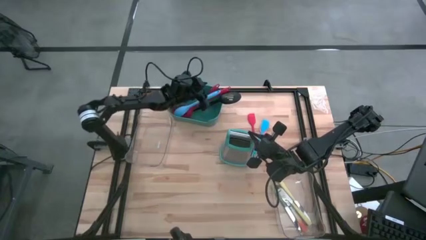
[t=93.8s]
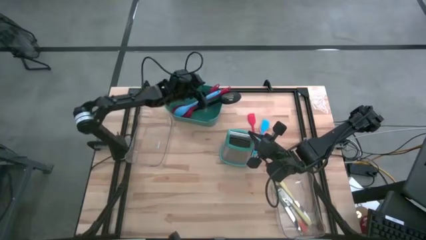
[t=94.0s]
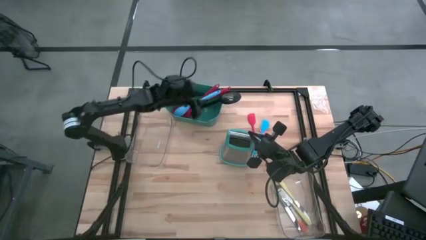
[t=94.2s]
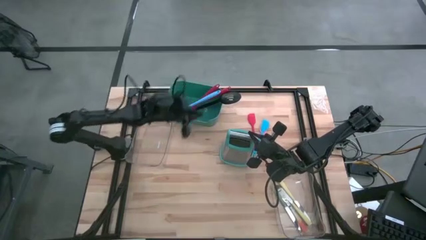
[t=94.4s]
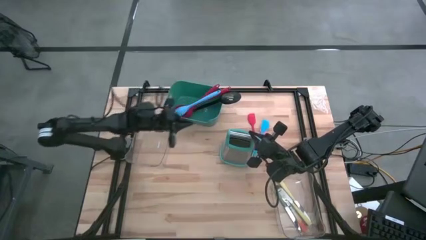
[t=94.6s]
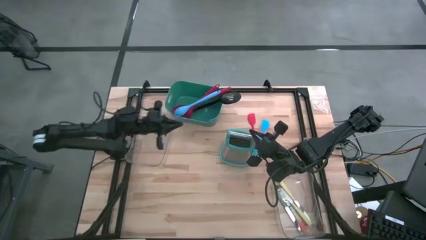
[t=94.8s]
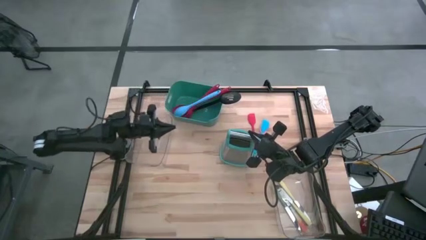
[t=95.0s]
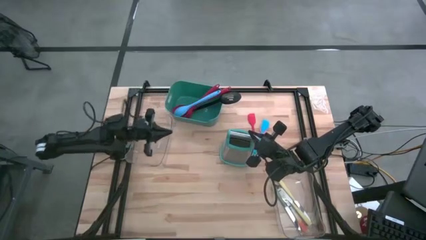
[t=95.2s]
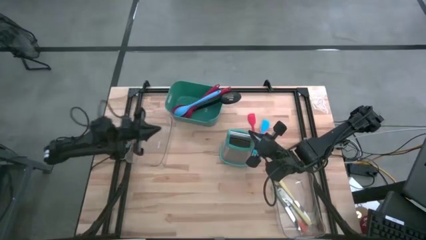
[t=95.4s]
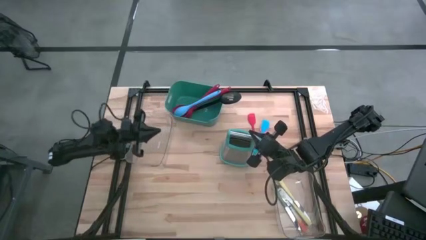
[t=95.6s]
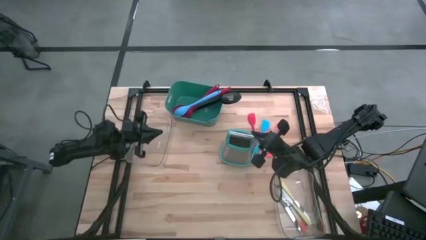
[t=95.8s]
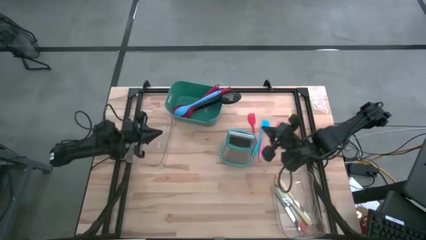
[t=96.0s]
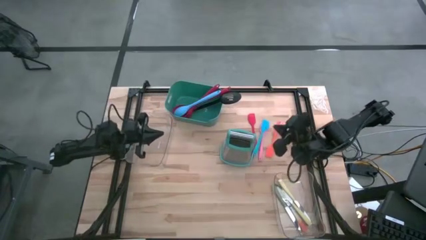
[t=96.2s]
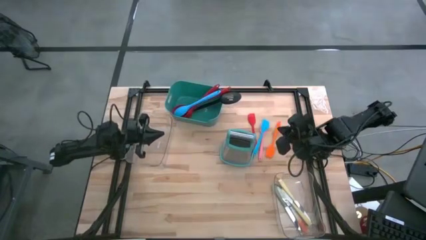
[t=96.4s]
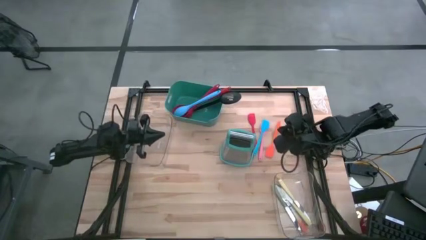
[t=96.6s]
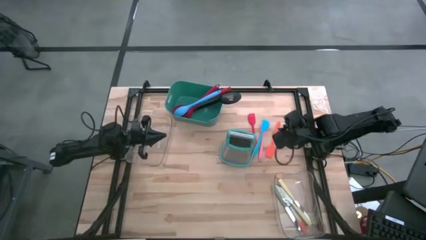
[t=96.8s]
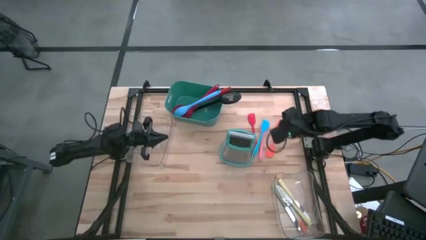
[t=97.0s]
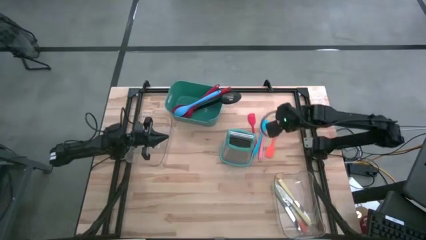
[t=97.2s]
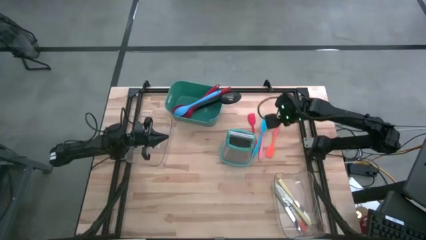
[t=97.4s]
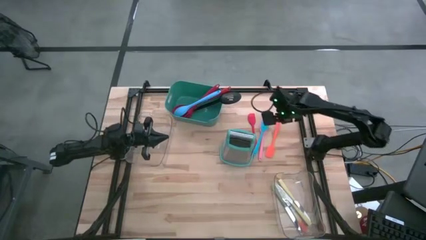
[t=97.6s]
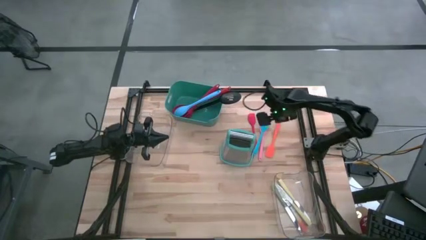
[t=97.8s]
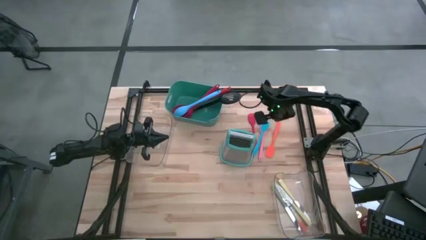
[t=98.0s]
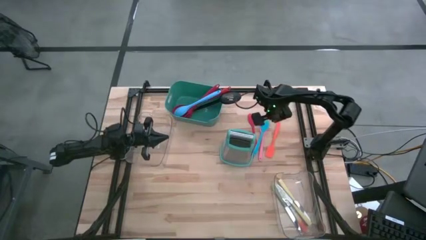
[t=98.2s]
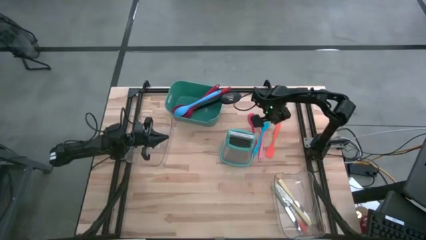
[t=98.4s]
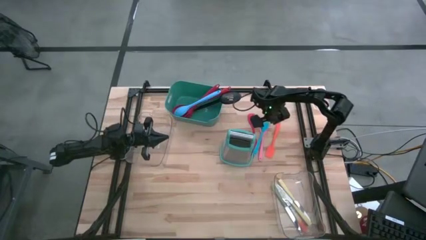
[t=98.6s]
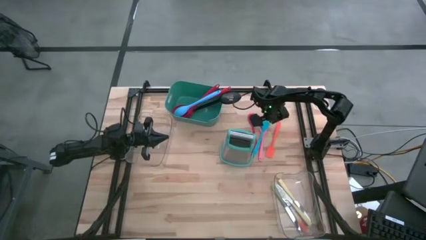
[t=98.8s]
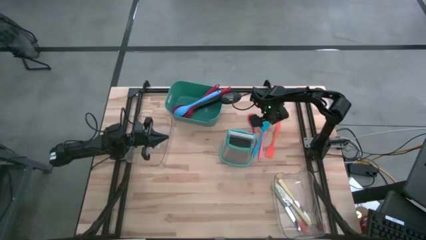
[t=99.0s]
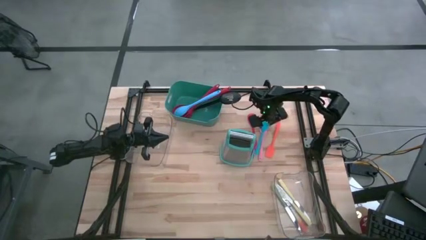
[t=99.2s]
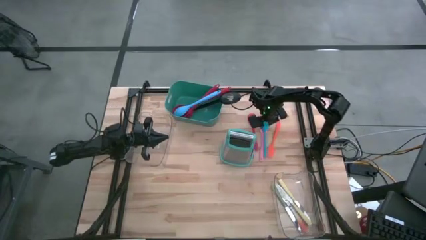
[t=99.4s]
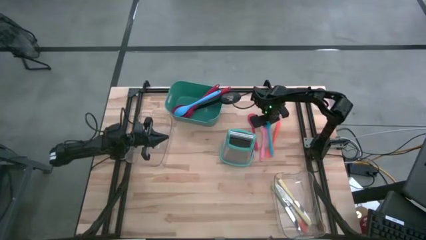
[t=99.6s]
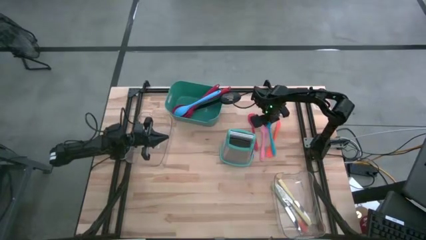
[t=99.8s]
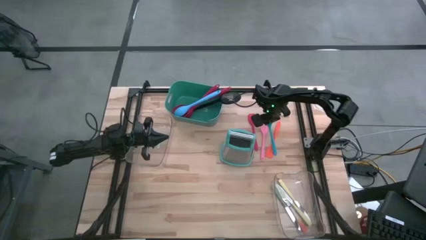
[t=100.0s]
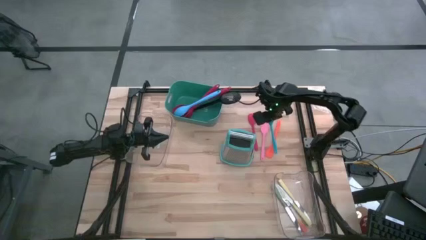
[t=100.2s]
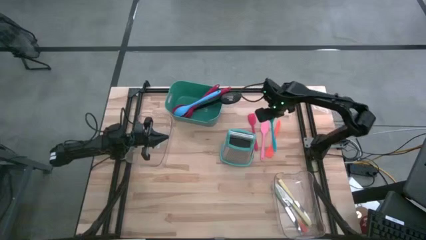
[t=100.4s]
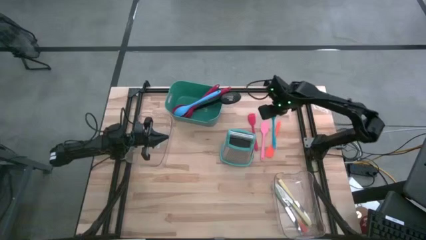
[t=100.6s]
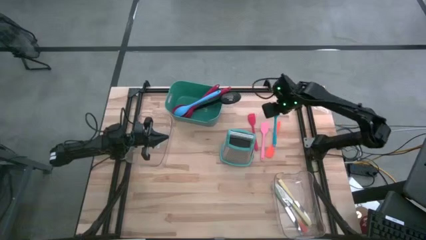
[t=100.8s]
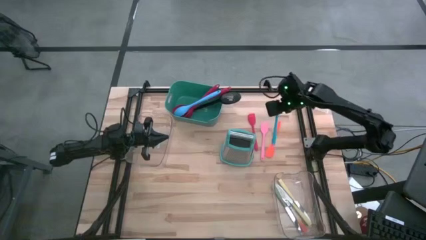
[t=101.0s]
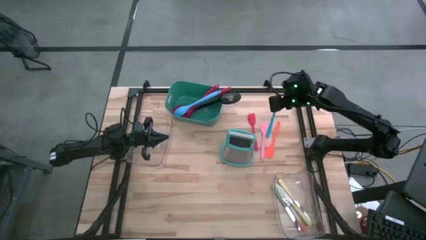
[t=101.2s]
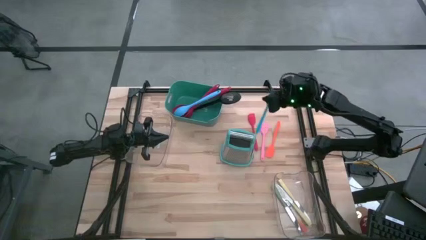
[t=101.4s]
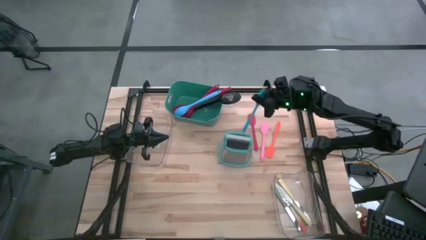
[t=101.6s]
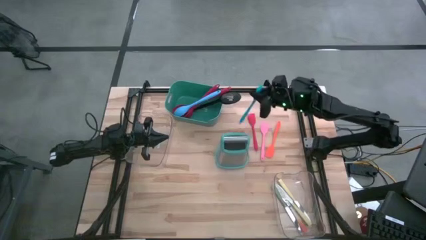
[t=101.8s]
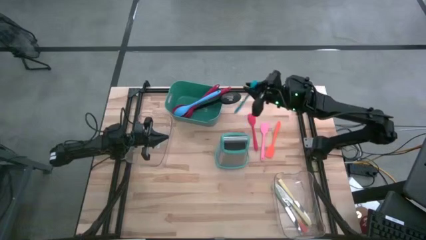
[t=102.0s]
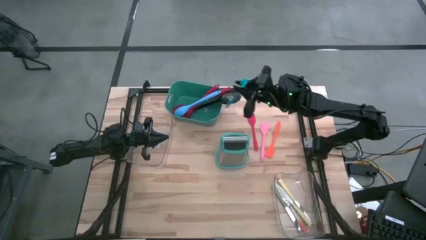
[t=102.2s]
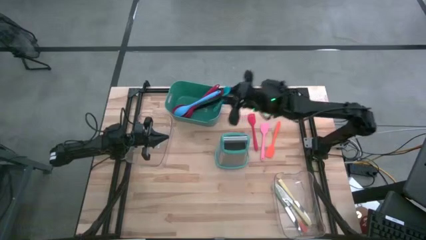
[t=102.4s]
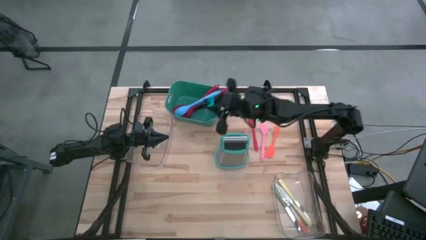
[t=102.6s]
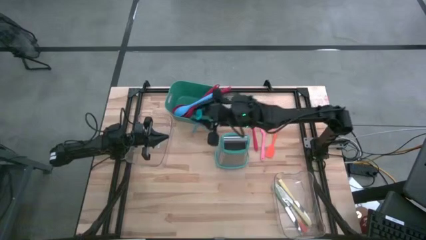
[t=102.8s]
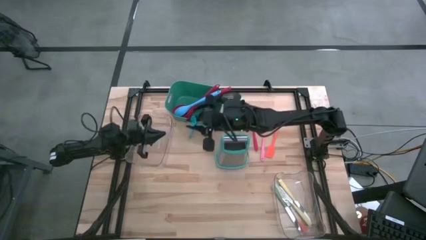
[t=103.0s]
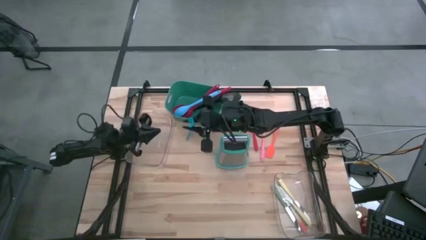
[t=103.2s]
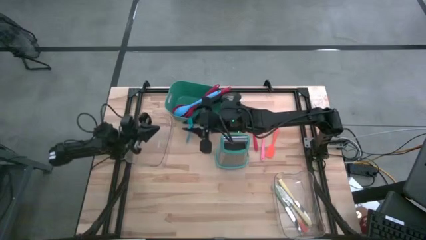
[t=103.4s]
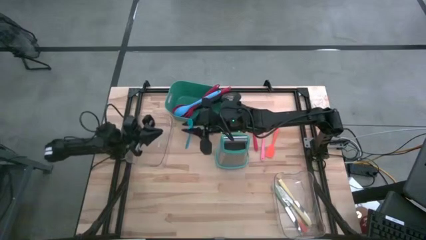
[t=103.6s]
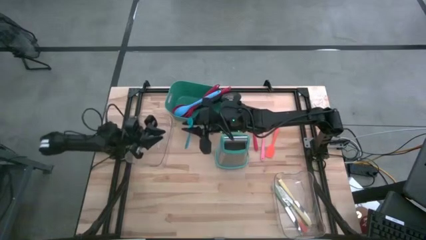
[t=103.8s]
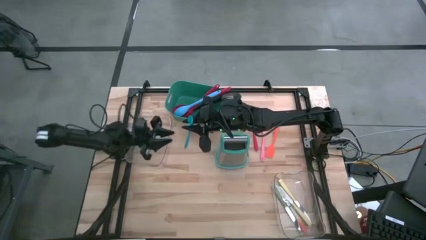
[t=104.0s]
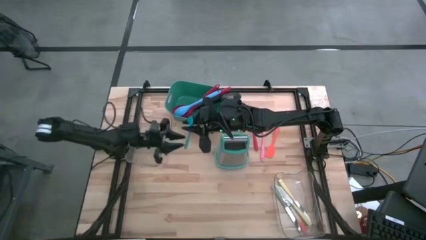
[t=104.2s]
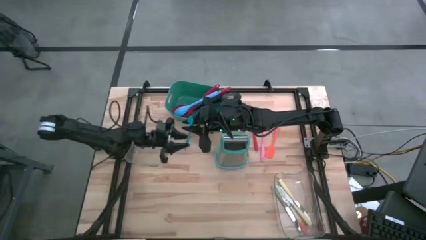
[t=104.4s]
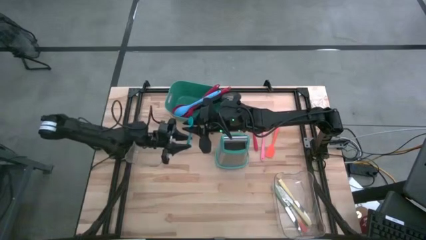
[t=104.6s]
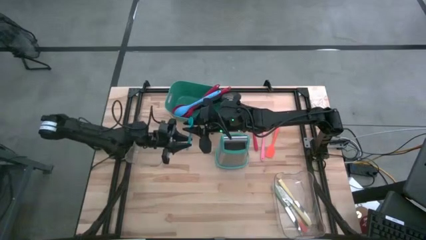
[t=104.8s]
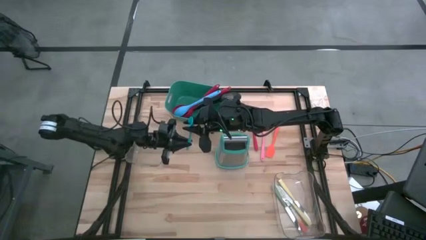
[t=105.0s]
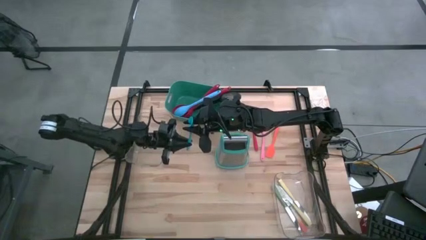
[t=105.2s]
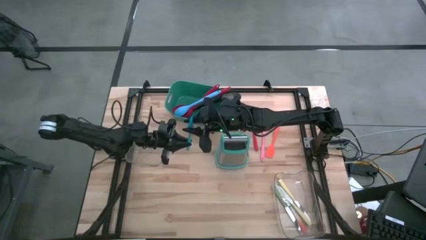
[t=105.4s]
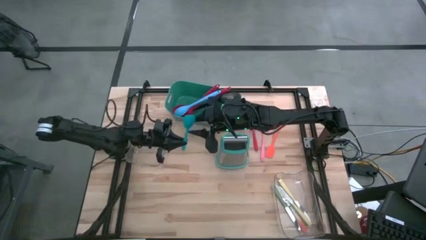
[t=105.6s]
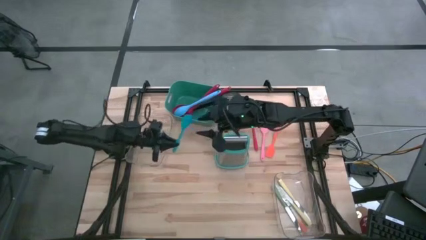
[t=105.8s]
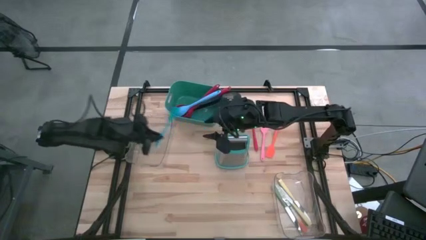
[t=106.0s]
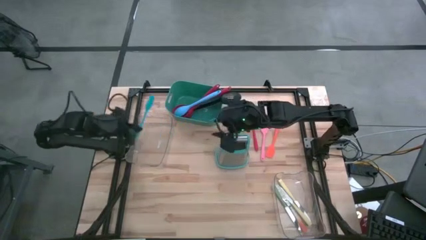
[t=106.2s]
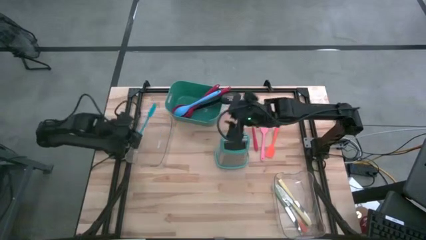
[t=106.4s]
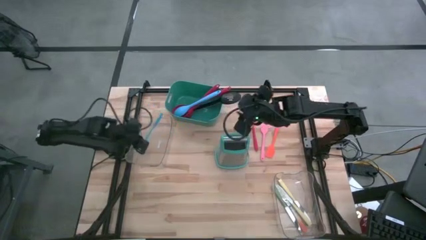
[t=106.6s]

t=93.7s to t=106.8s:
Task: Pick & Place Kitchen Items
Put the blue spatula into the top transparent bin

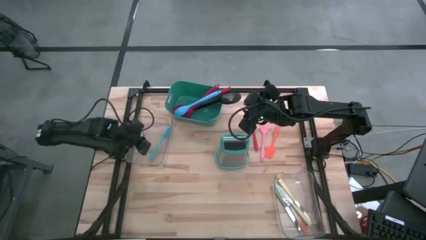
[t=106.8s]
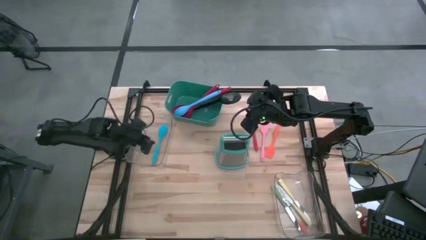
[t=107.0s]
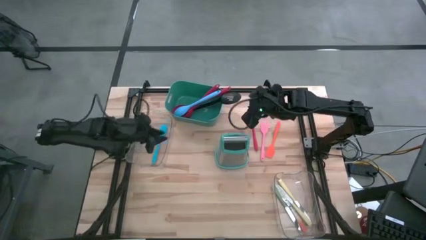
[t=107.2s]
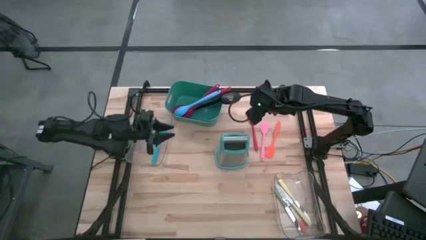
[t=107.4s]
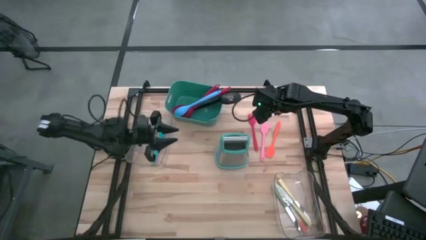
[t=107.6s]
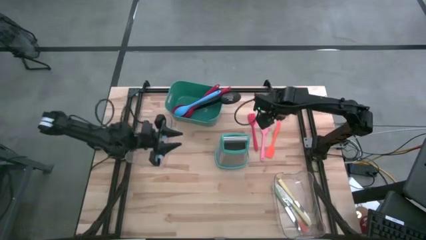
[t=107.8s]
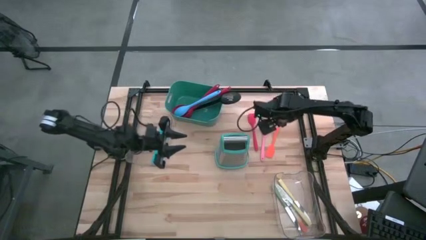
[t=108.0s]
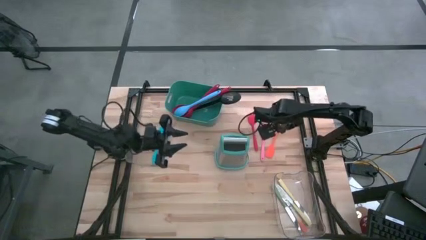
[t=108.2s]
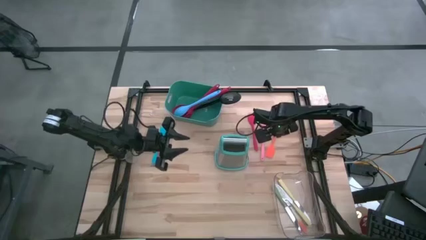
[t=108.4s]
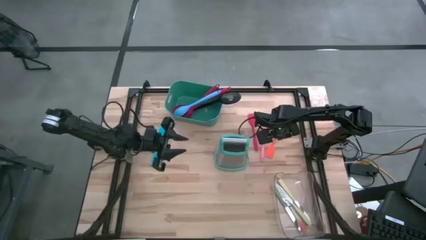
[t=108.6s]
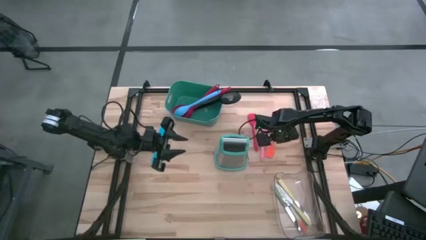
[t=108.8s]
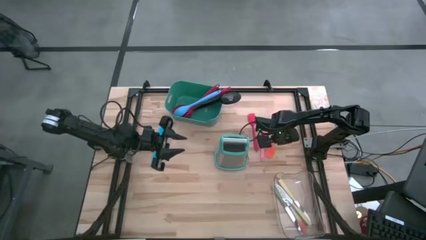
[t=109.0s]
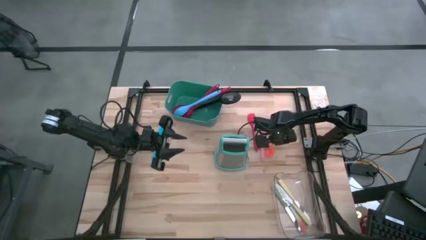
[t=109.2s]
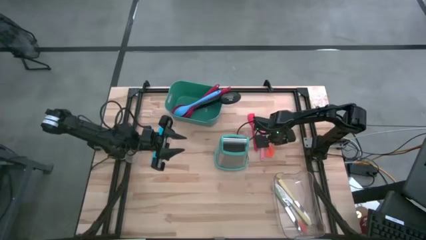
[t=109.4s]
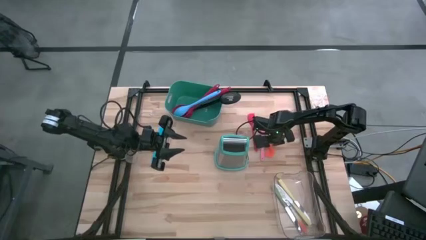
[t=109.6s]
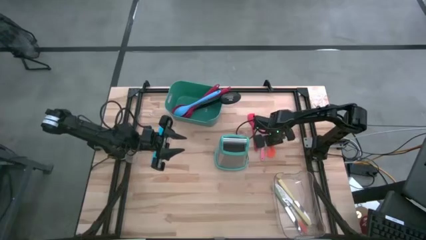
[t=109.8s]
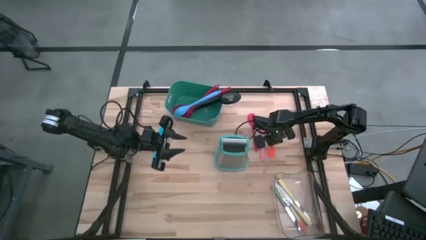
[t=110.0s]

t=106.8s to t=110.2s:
Put the orange spatula into the top transparent bin
